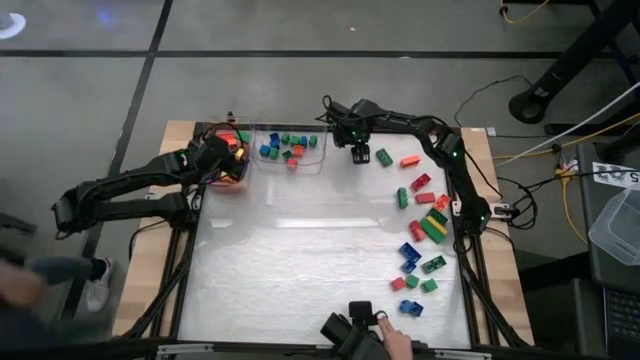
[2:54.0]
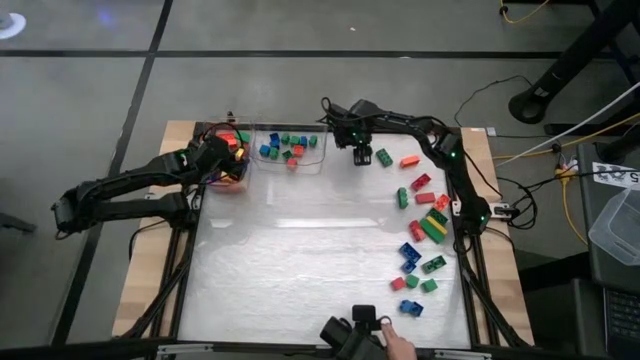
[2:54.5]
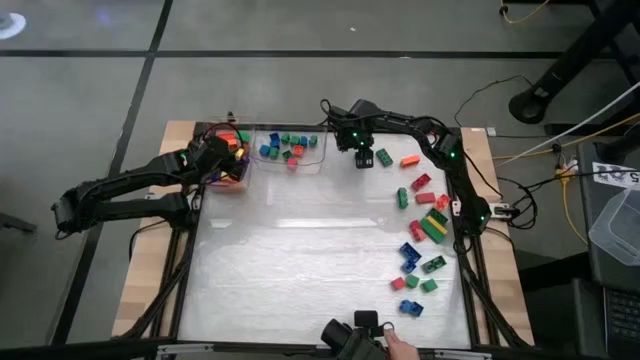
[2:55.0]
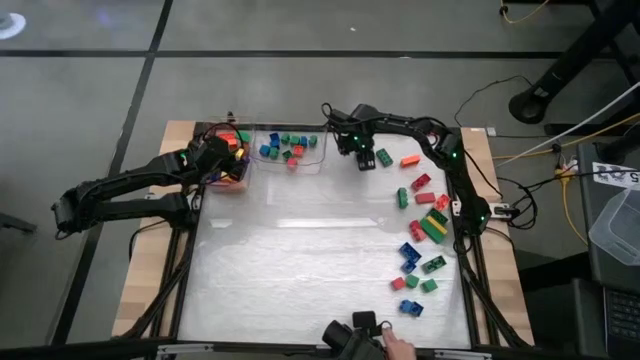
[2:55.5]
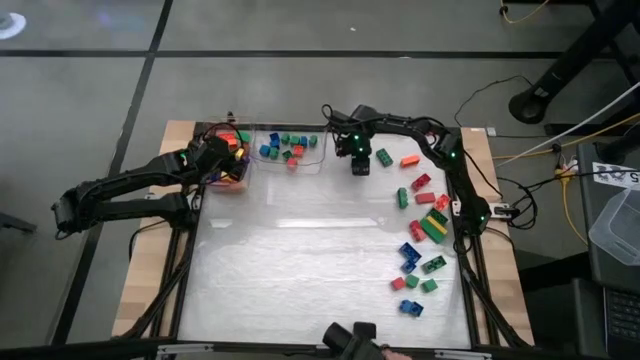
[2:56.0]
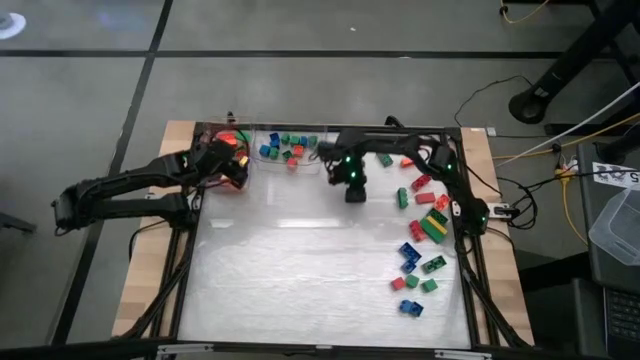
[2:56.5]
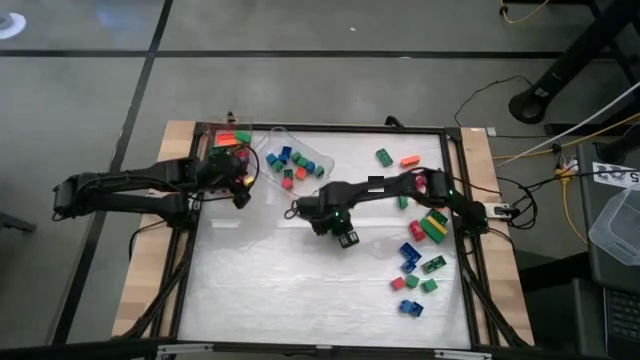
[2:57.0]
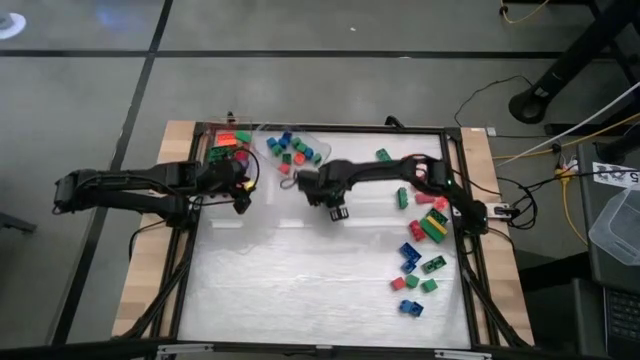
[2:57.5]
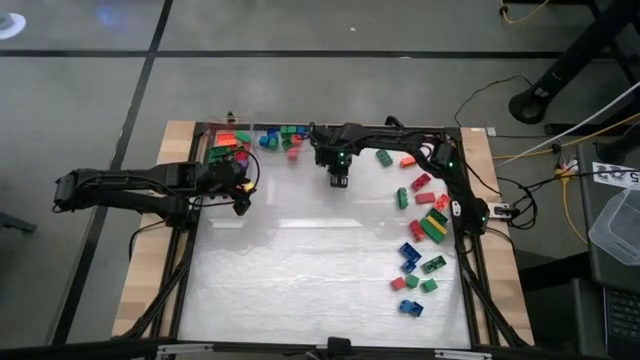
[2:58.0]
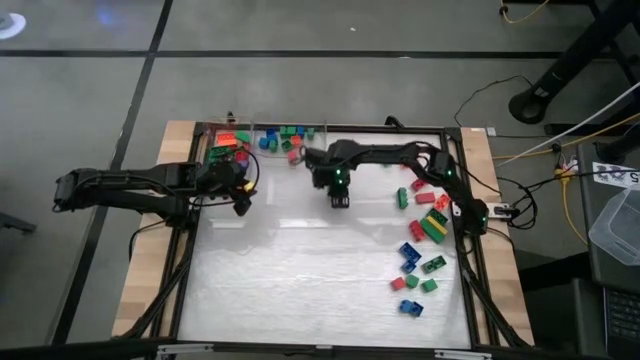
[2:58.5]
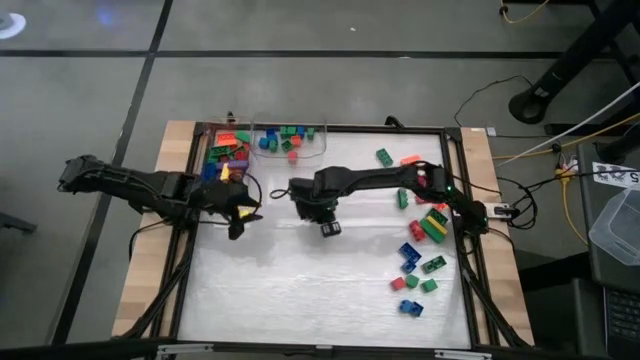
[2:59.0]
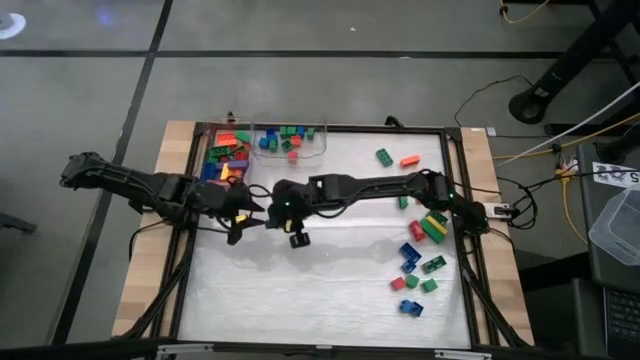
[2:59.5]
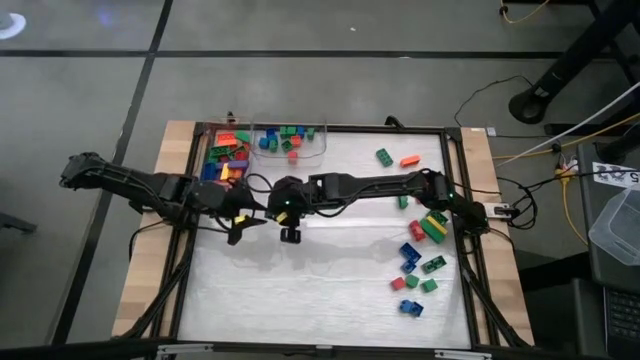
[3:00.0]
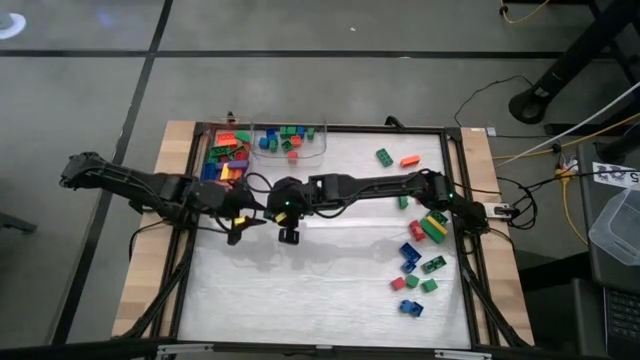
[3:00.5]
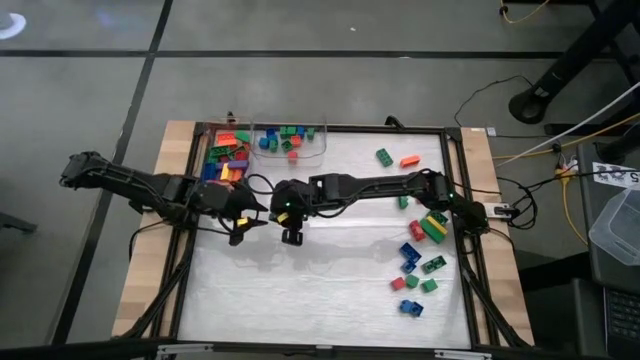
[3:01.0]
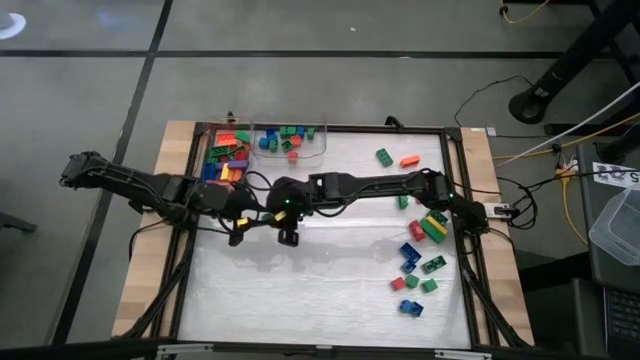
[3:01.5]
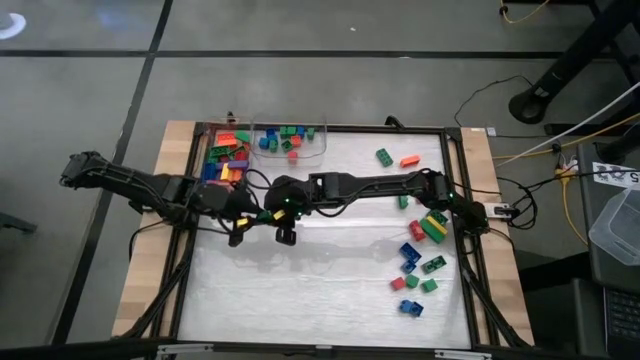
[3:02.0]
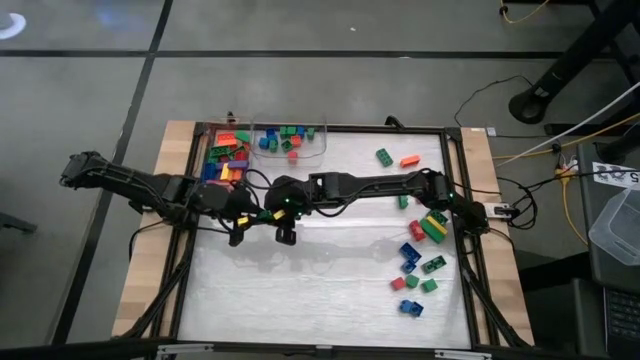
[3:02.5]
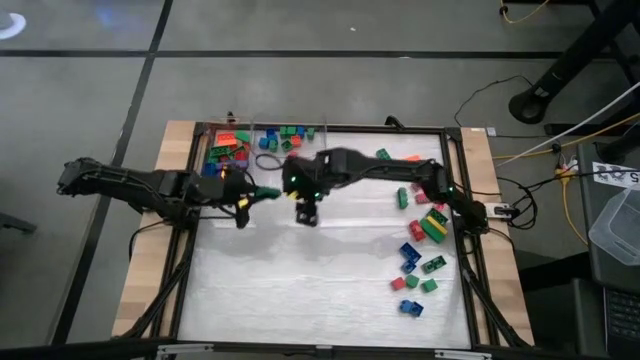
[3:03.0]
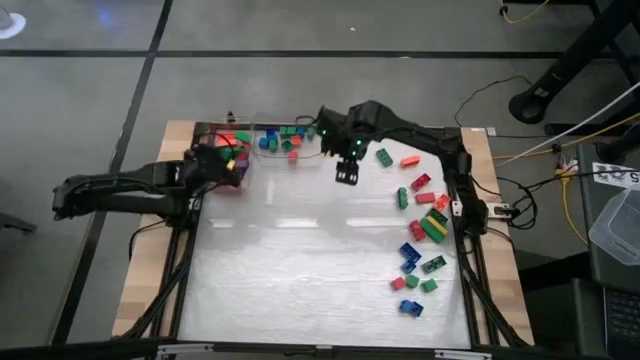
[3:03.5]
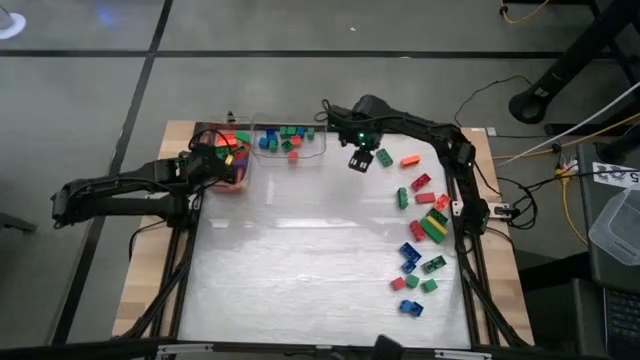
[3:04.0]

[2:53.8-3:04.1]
Task: Sort blocks by size
Put the large green game piece into the left transparent bin

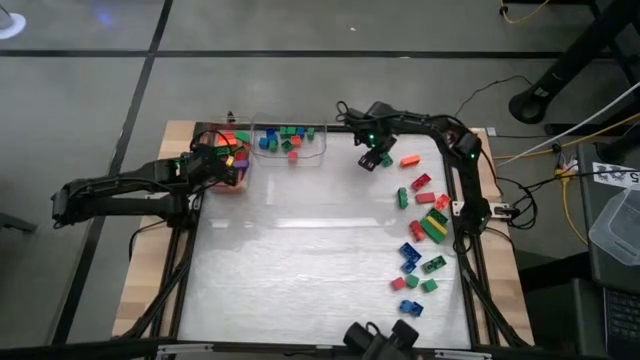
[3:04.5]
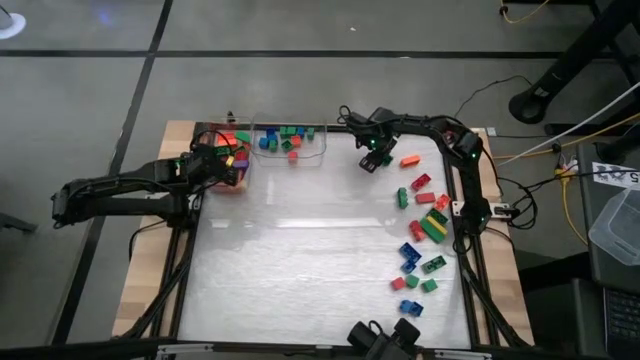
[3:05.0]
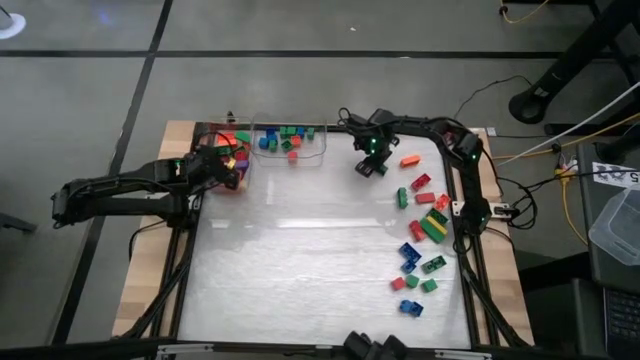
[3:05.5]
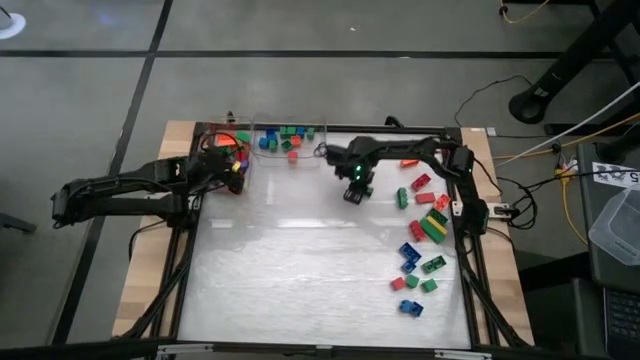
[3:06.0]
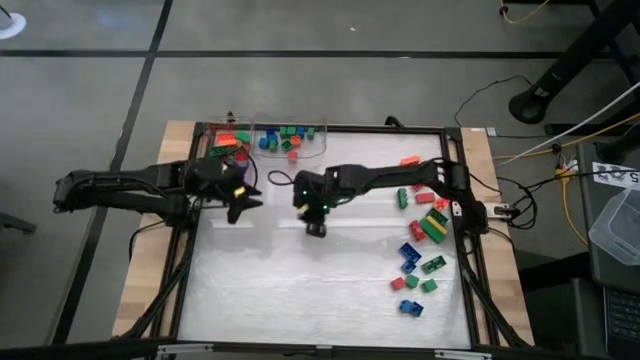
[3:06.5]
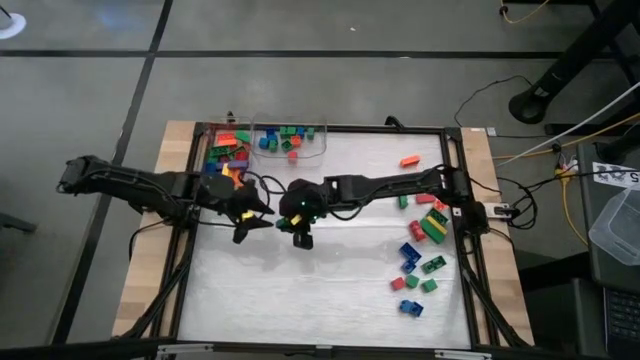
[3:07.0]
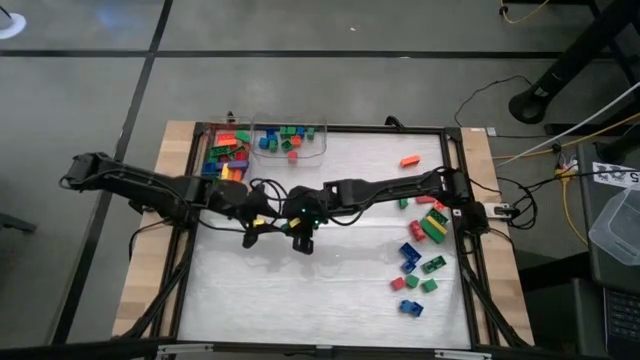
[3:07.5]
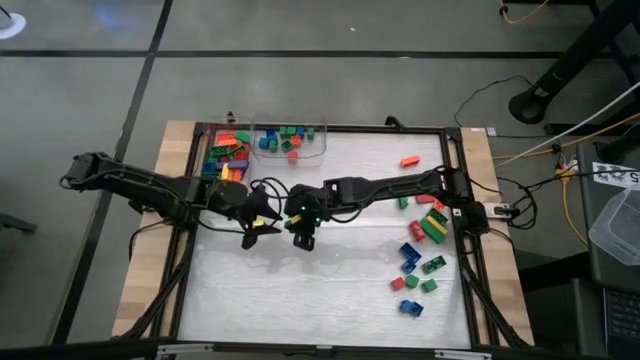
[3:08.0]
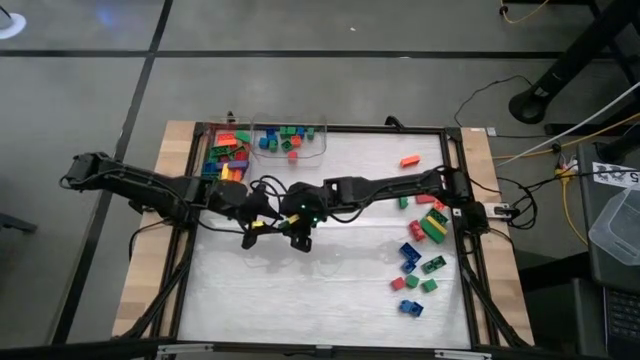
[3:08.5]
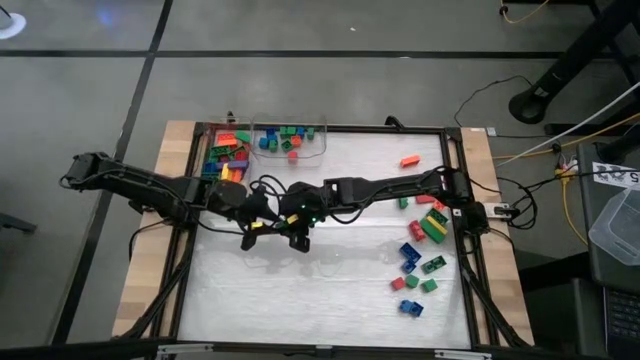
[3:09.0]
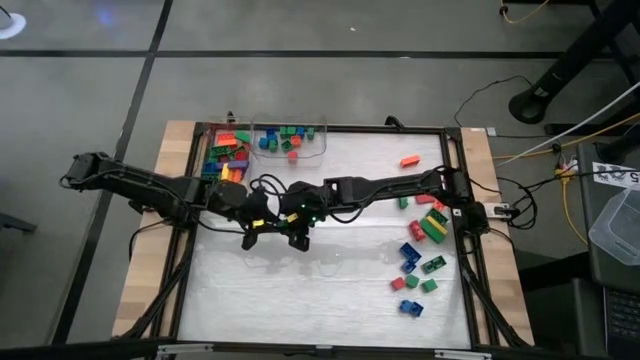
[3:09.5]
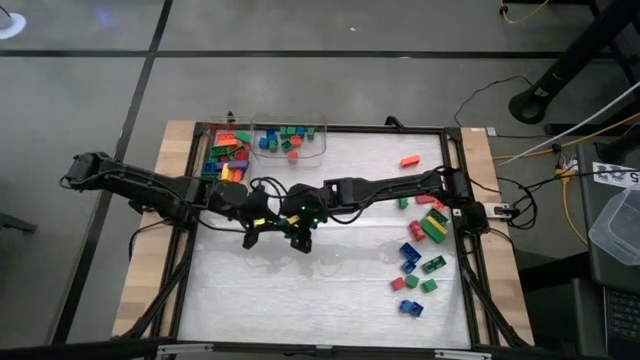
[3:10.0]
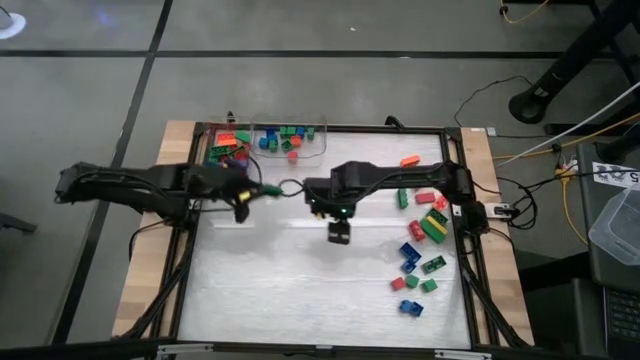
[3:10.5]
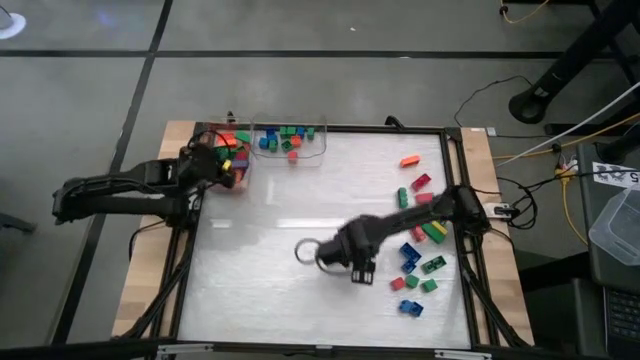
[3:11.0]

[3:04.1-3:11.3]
Put the large green game piece into the left transparent bin

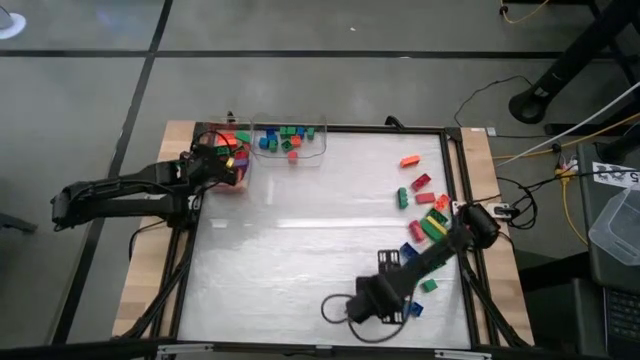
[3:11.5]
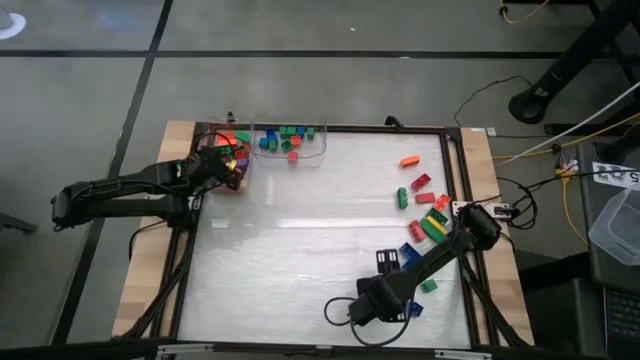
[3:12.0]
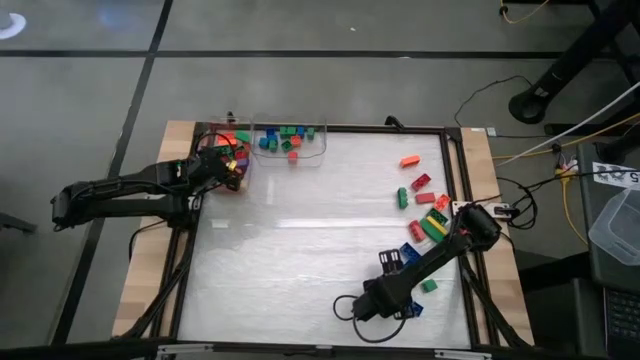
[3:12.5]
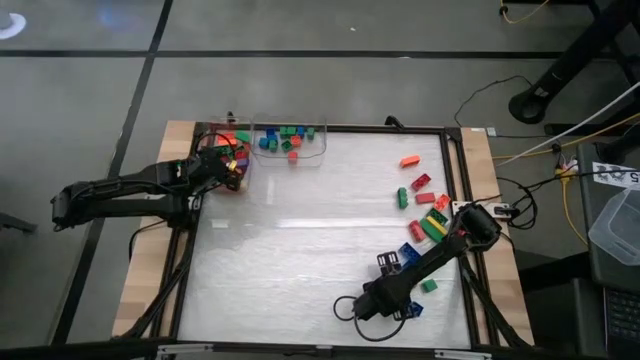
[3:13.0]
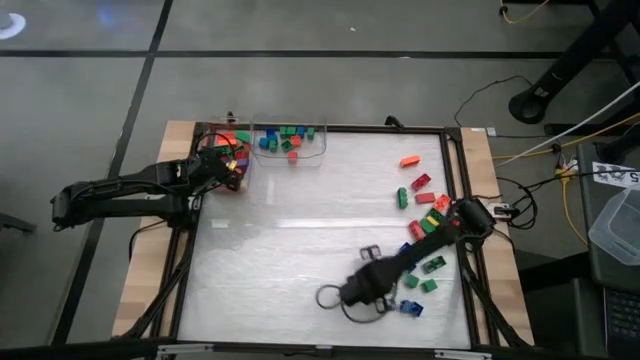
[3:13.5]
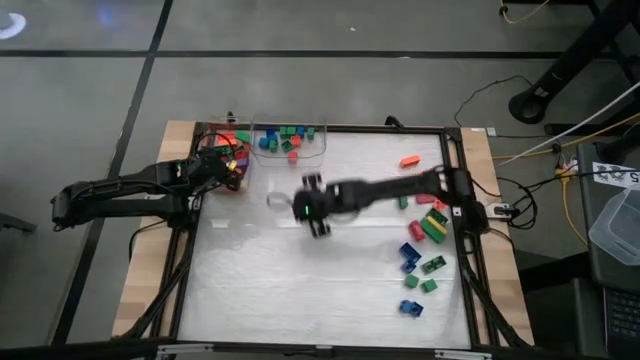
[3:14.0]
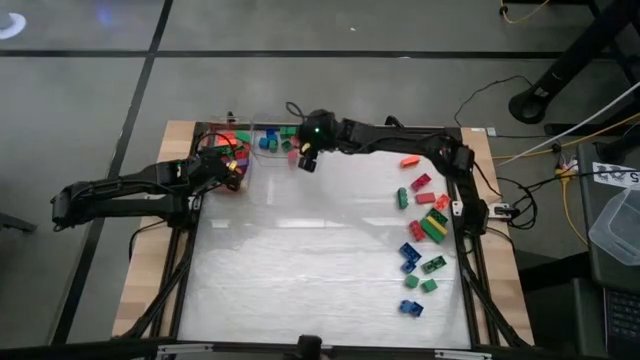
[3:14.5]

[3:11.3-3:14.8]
Put the small red block into the right transparent bin

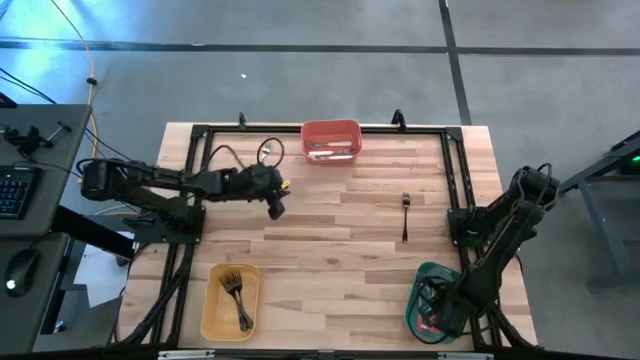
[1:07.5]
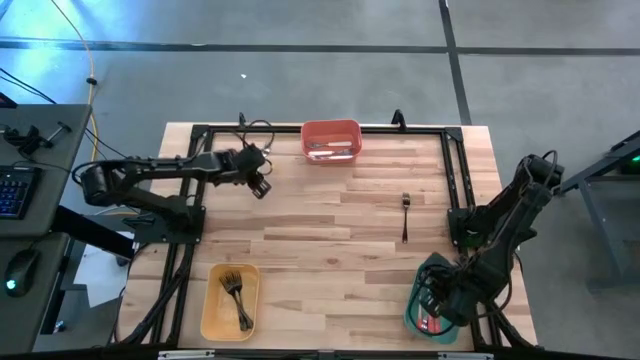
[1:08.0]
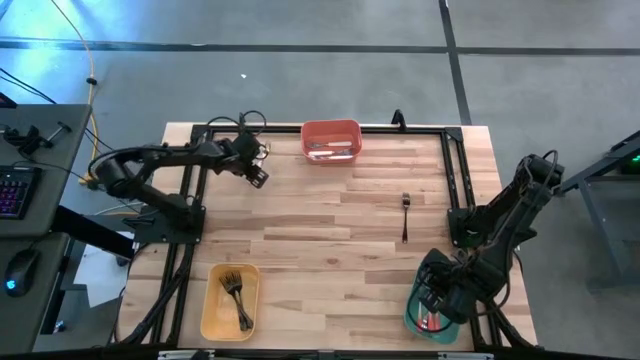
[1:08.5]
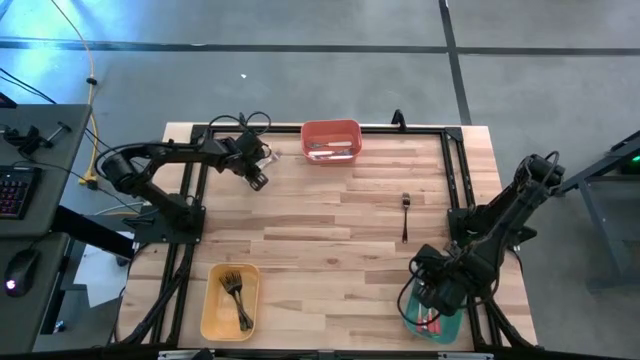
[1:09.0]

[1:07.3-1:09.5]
Task: Sort silverware by color (type)
Put the white fork into the orange bin
